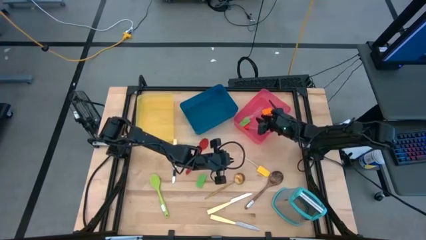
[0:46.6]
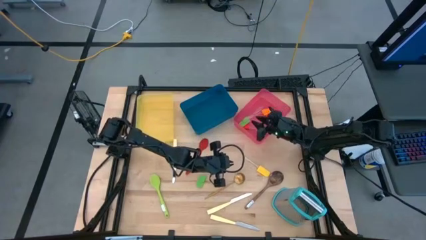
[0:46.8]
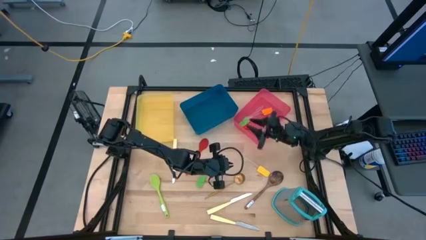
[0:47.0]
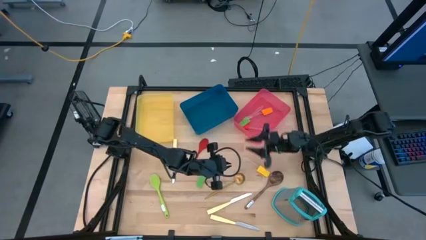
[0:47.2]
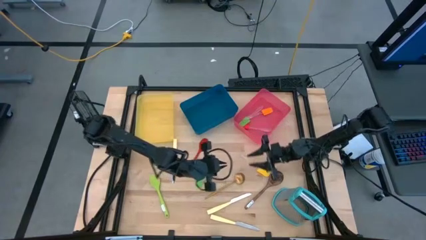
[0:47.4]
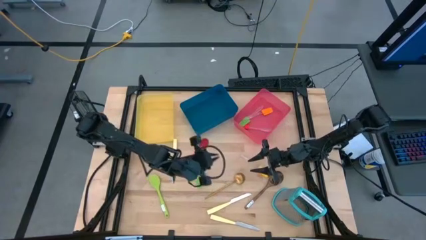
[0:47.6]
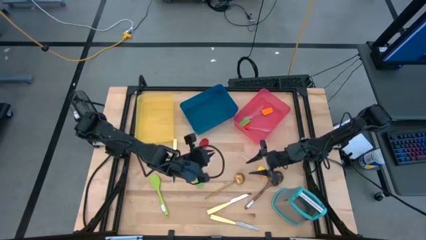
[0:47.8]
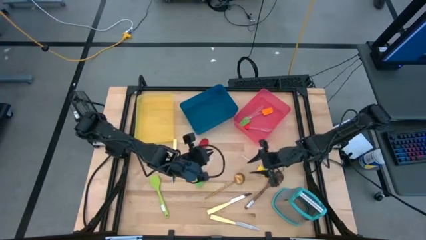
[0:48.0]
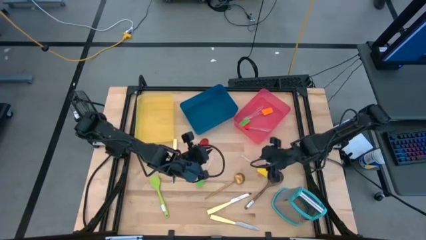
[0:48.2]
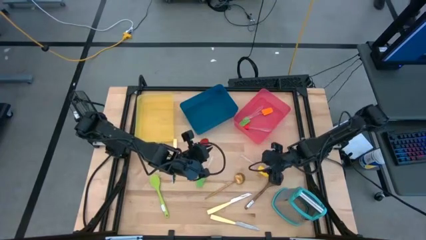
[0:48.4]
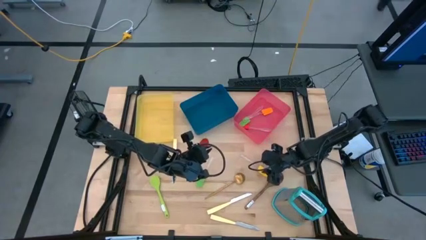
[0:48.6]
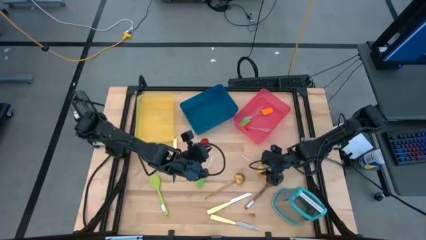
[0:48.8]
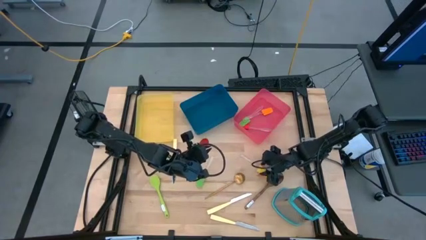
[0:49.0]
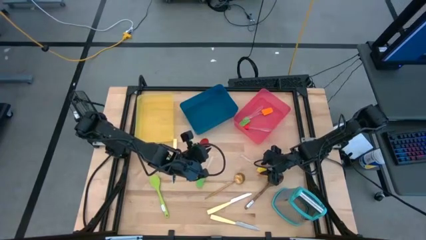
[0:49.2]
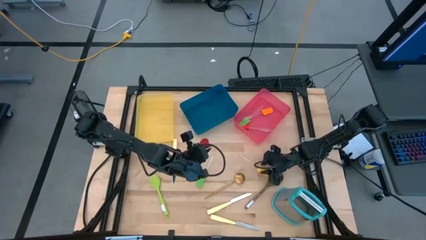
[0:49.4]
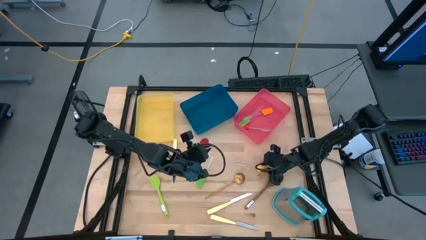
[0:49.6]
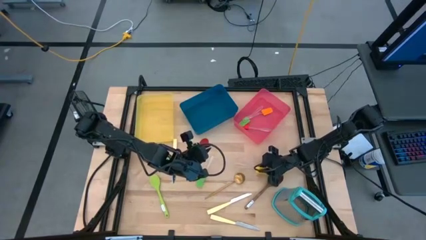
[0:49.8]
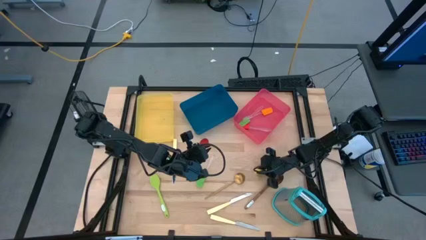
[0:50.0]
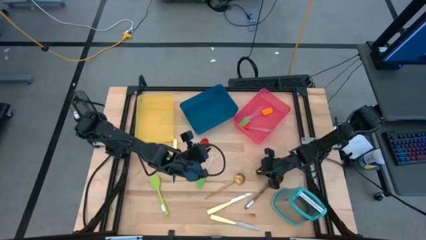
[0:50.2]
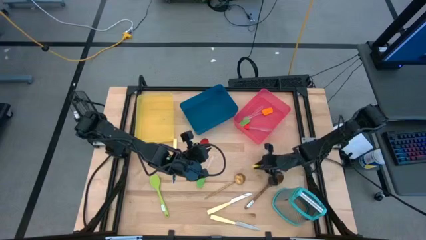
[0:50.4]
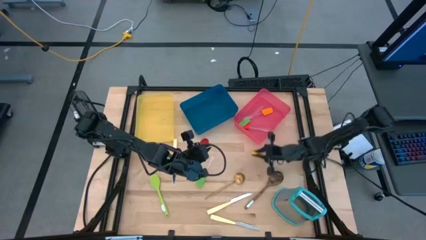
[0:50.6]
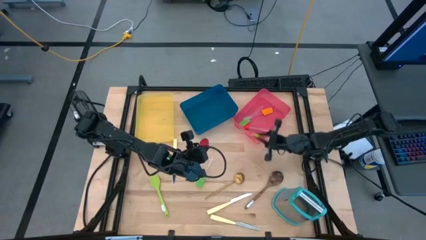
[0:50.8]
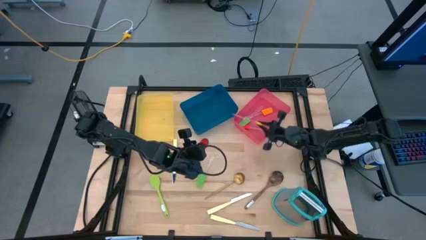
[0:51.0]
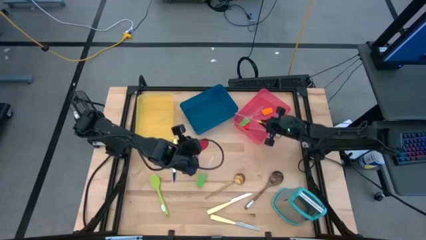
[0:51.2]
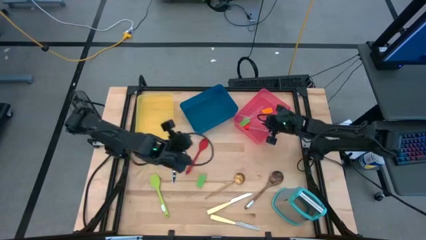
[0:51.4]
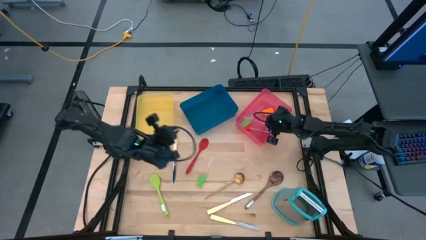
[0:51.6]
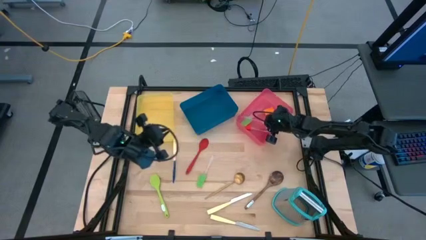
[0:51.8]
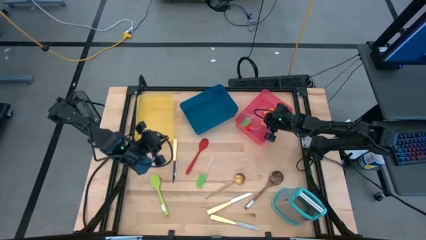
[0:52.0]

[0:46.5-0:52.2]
Task: Pick & Place Kitchen Items
Put the yellow spatula into the red bin

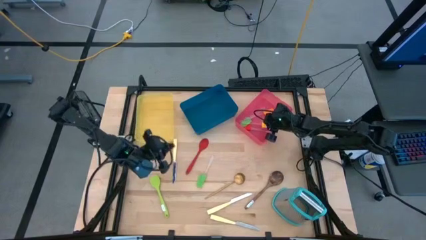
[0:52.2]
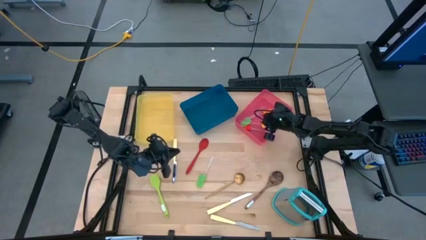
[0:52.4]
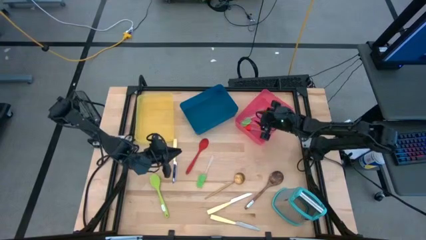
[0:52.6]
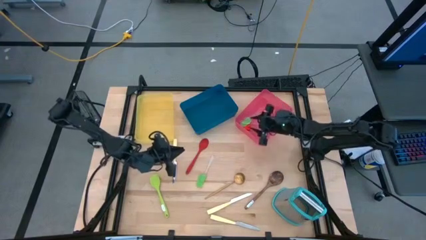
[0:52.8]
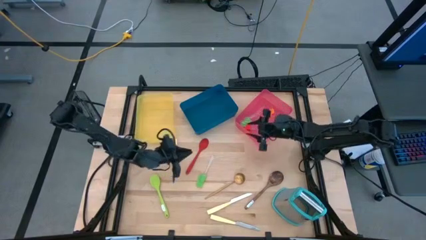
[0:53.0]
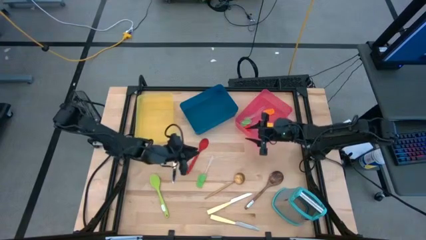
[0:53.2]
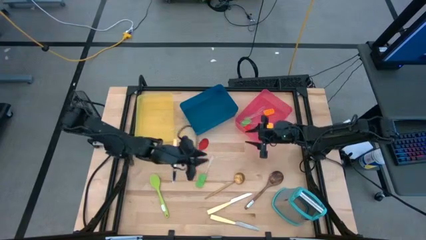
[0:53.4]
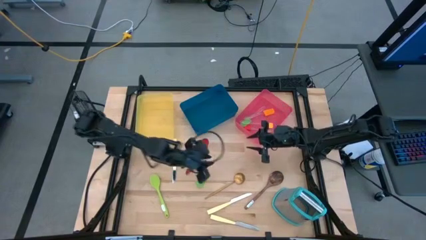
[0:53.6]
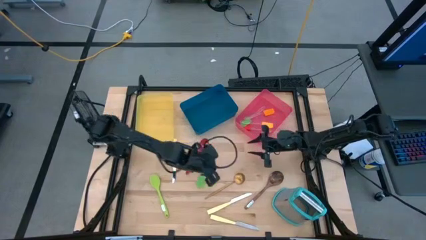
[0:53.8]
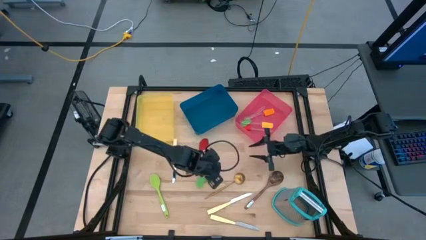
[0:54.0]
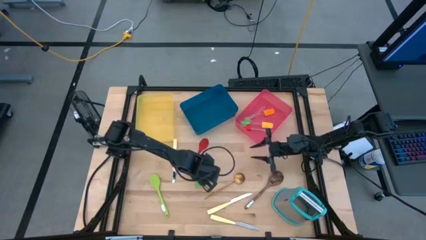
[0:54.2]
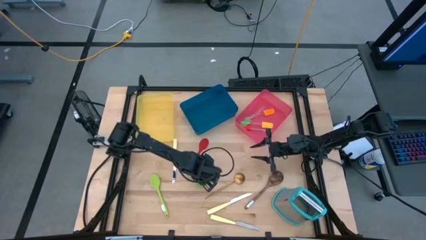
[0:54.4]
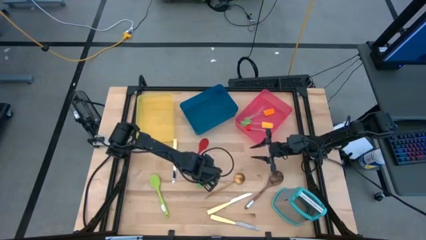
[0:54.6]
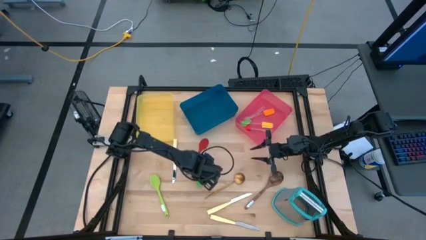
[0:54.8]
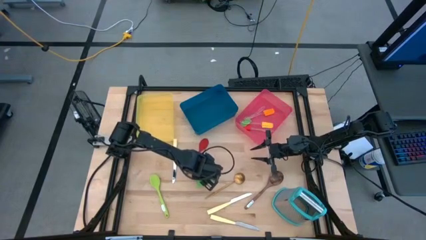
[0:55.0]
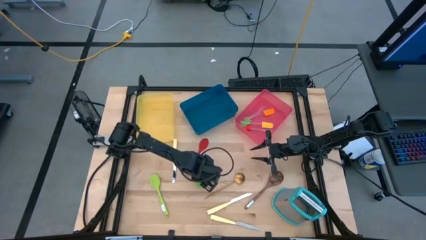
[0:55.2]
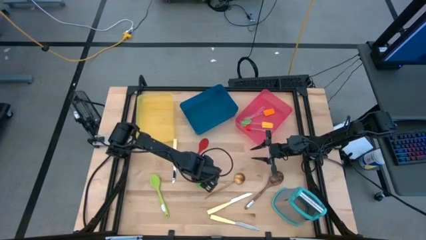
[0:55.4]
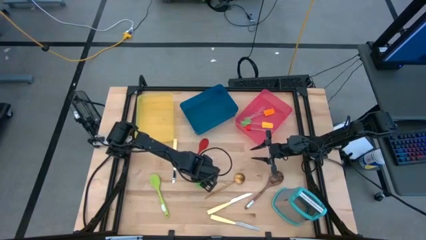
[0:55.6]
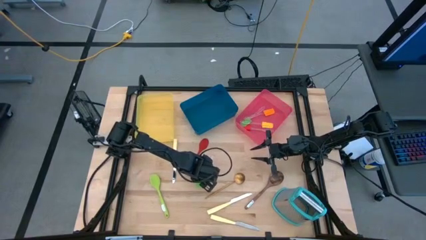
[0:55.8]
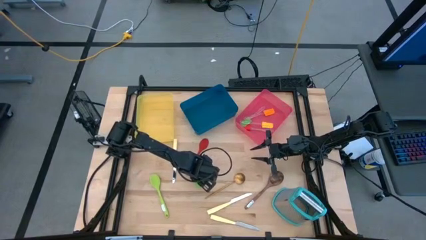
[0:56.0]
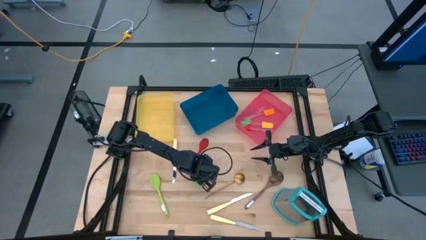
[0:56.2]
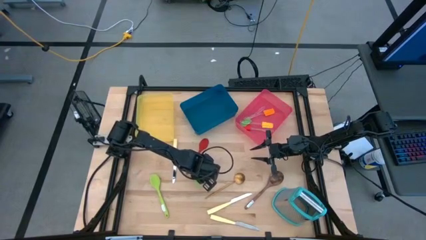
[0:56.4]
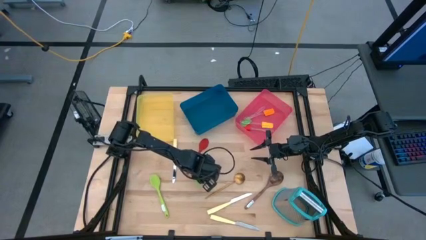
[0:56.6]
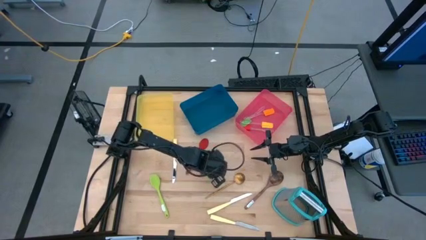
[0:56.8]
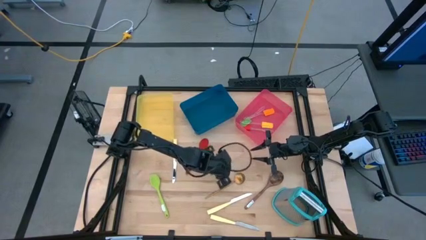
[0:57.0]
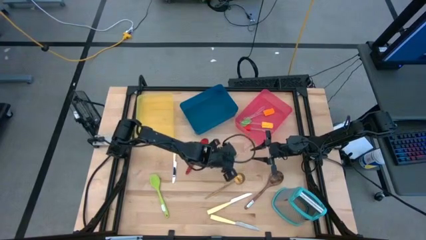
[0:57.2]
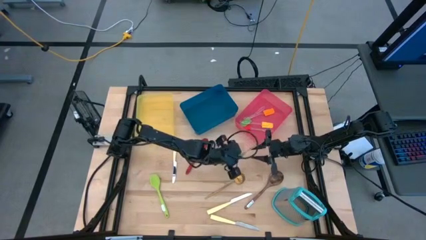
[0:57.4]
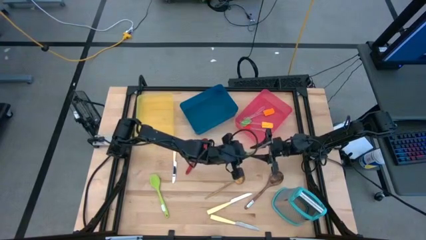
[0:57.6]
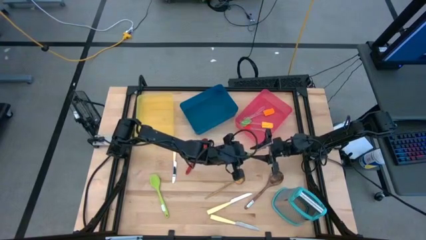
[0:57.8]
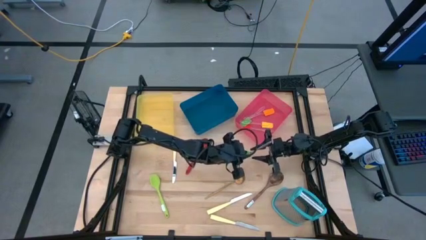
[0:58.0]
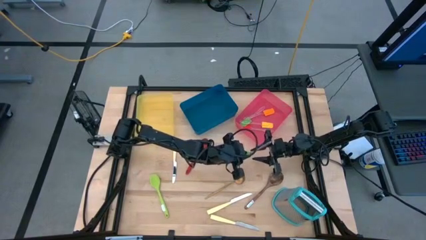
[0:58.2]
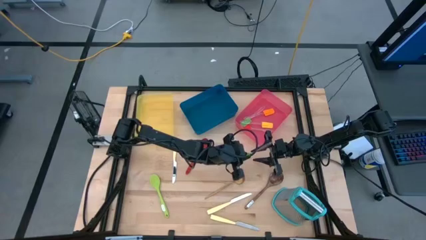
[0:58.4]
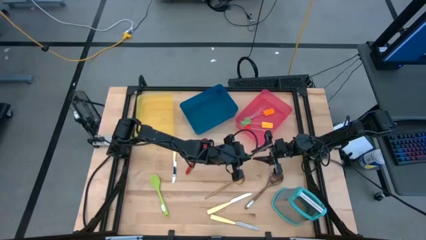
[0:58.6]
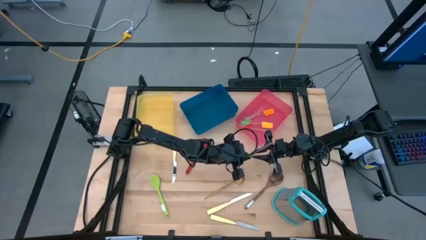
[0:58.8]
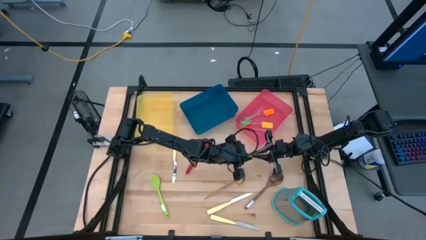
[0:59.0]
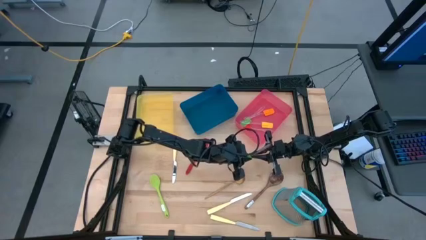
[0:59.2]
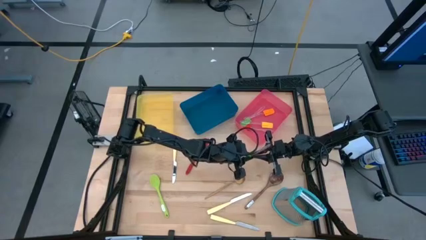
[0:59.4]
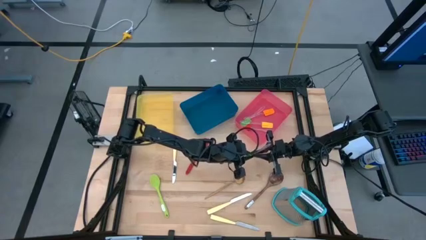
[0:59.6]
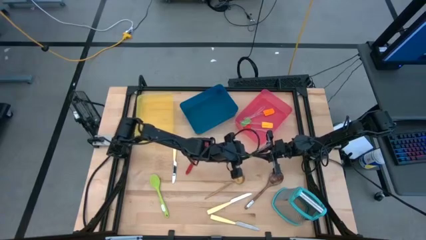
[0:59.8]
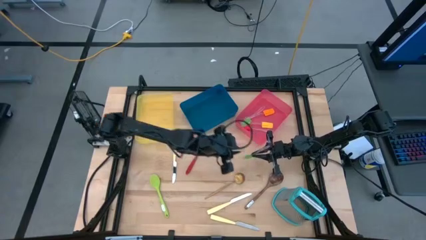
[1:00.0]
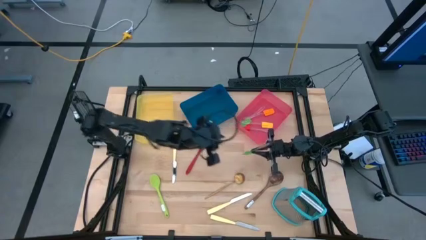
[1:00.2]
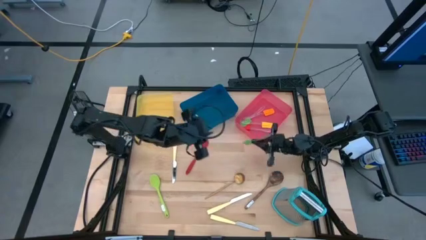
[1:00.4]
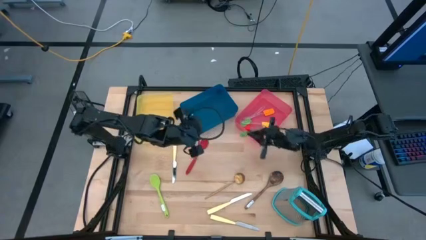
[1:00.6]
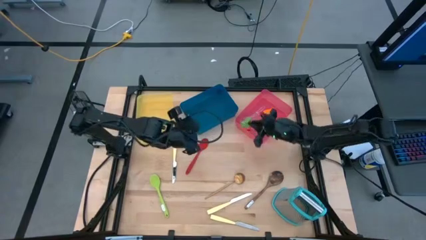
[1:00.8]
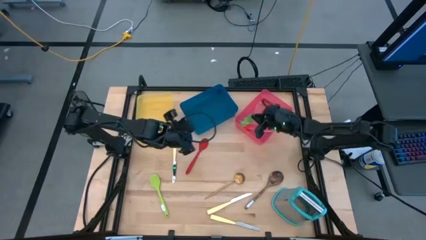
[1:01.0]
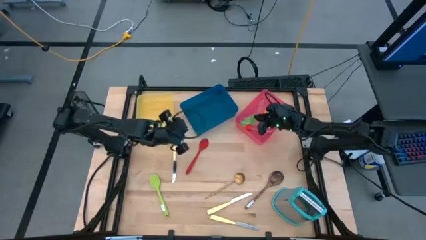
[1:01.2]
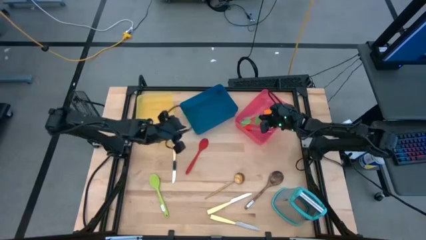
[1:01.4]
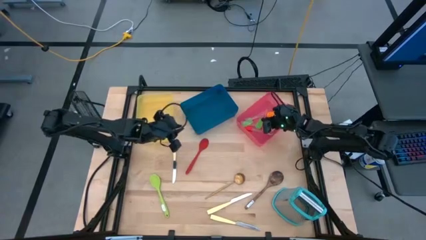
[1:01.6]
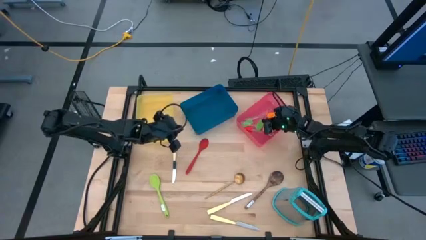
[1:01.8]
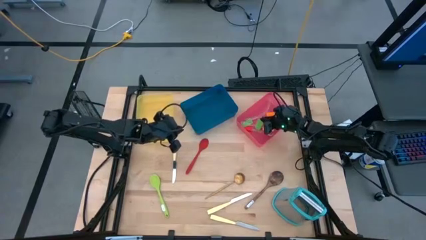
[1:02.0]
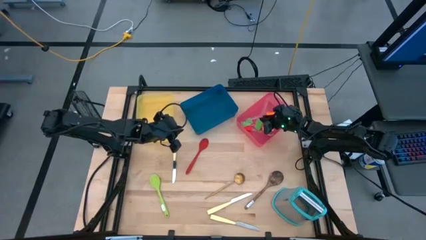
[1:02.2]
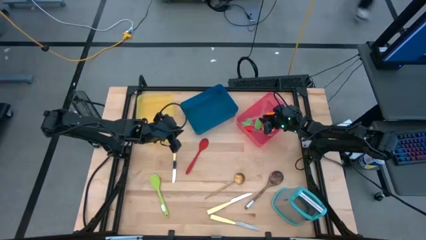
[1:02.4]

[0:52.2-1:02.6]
Put the green spatula into the red bin

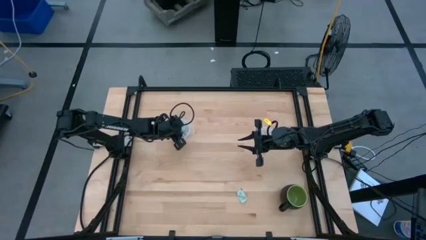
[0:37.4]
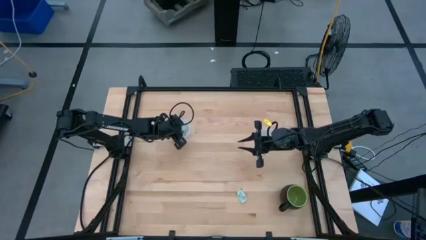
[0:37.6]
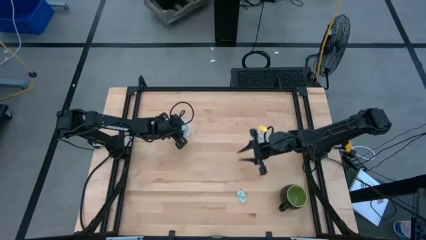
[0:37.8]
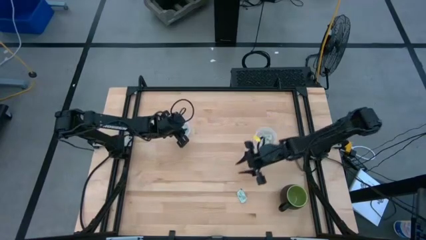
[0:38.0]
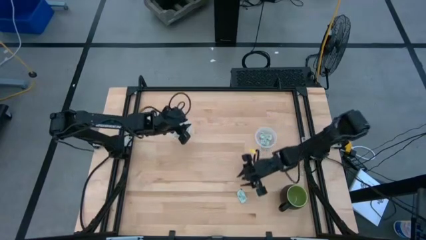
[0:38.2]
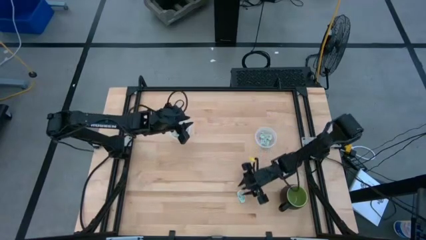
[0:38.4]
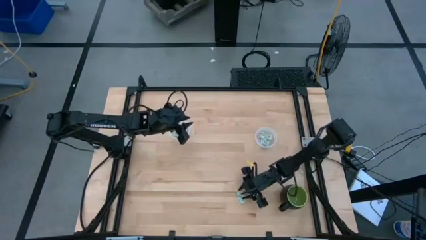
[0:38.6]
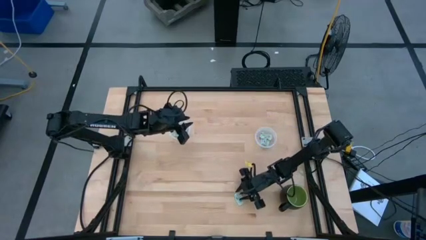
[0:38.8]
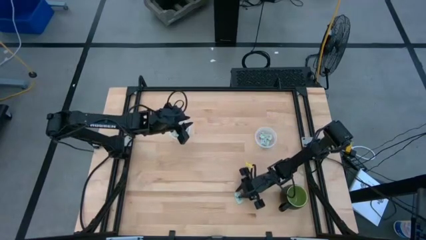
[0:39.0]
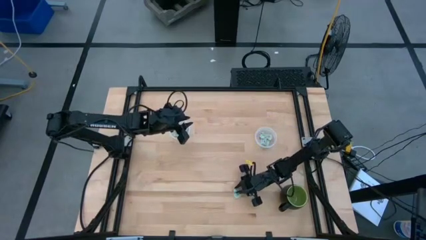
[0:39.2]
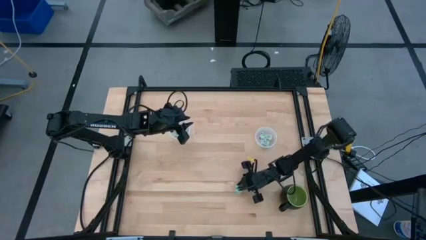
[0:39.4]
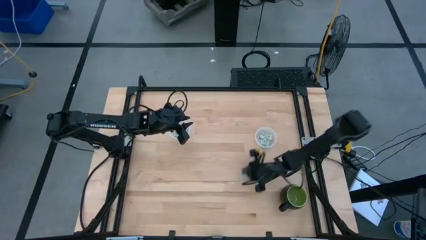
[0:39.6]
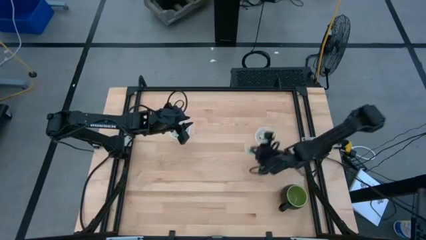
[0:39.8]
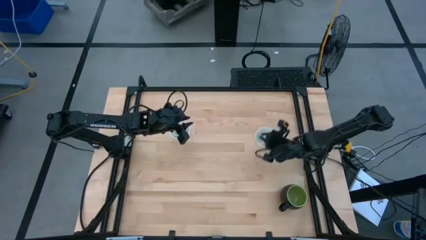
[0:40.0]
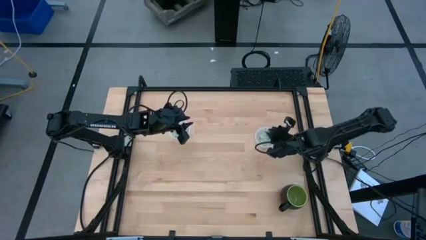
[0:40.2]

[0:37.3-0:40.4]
Task: Pick and place Stevia / Truvia into bins
Put the stevia packet into the right transparent container
